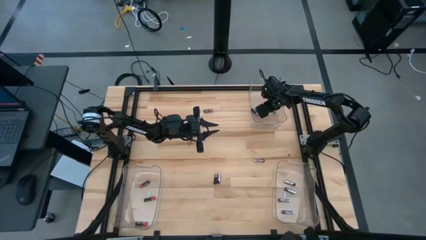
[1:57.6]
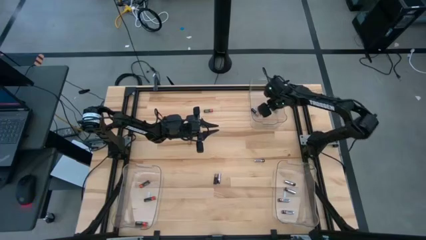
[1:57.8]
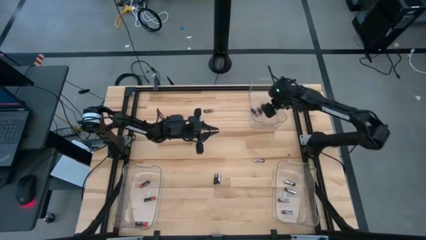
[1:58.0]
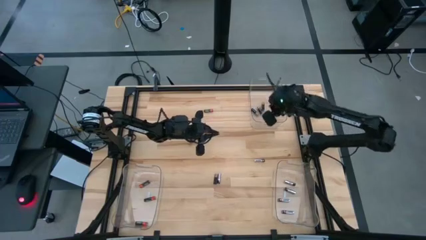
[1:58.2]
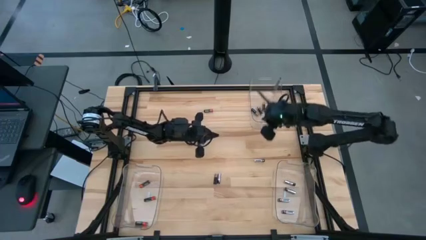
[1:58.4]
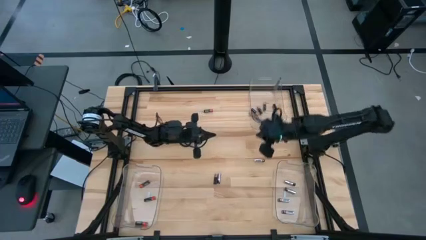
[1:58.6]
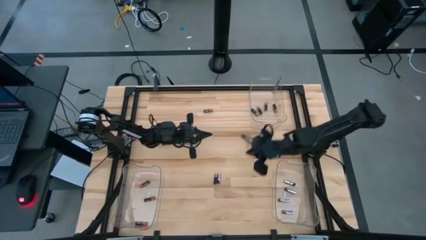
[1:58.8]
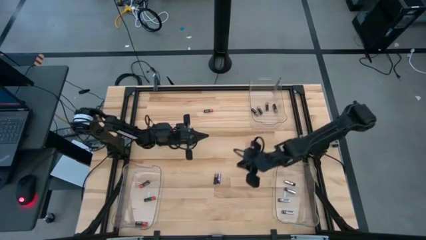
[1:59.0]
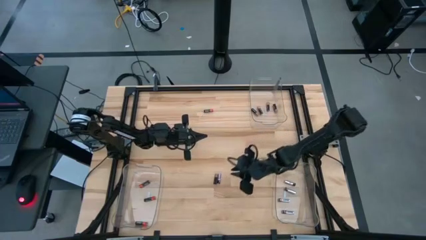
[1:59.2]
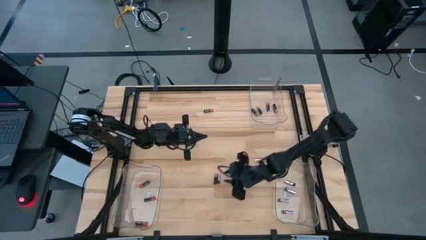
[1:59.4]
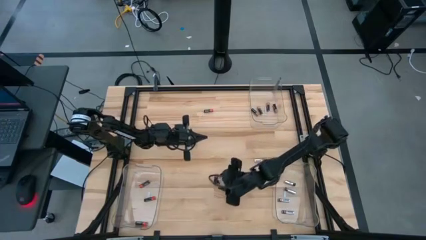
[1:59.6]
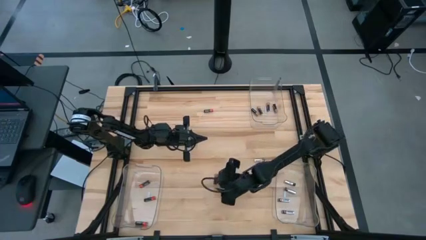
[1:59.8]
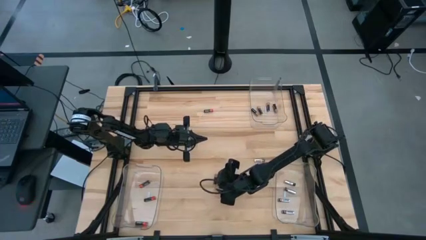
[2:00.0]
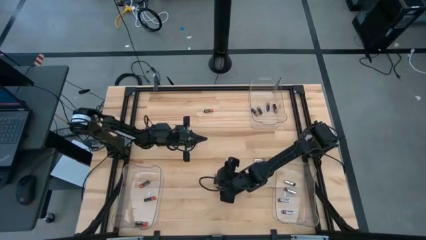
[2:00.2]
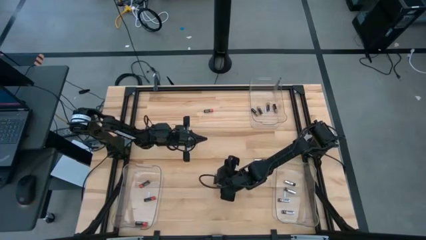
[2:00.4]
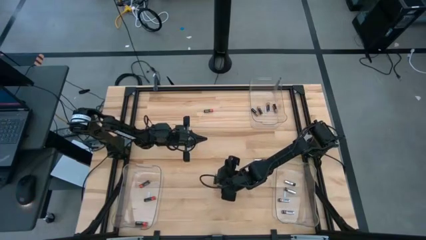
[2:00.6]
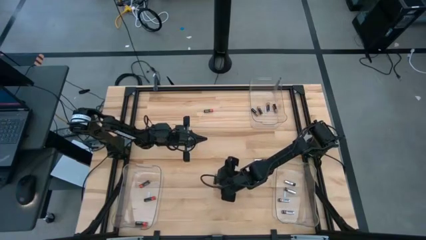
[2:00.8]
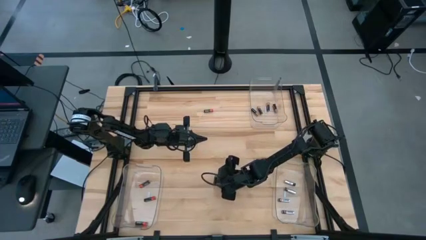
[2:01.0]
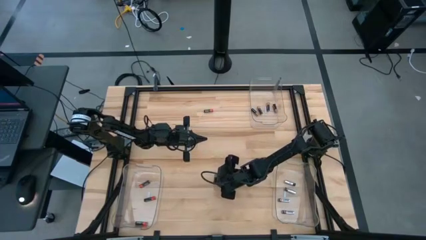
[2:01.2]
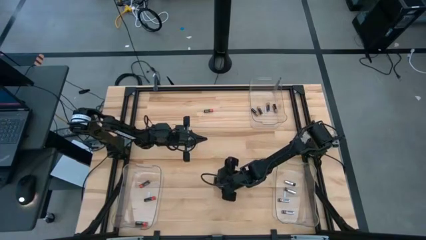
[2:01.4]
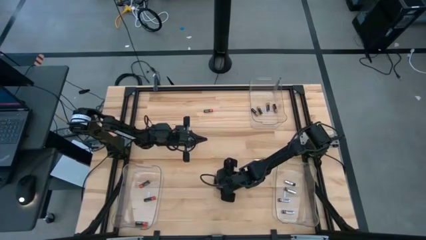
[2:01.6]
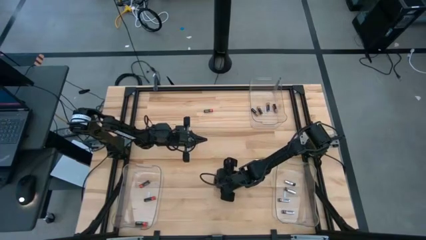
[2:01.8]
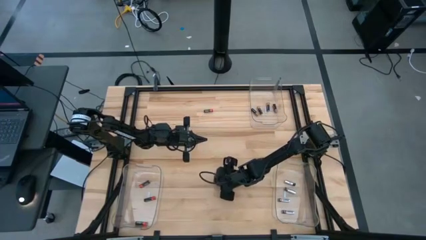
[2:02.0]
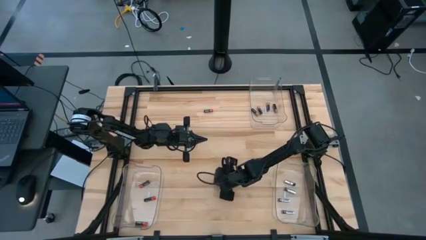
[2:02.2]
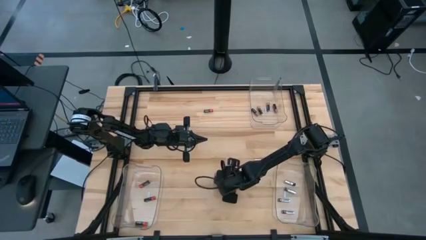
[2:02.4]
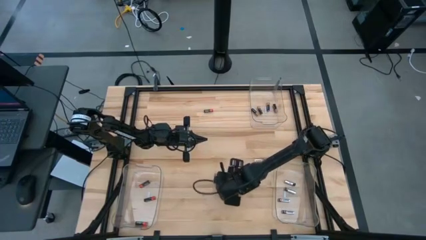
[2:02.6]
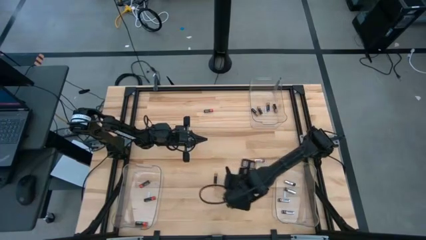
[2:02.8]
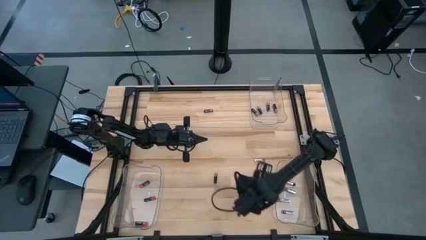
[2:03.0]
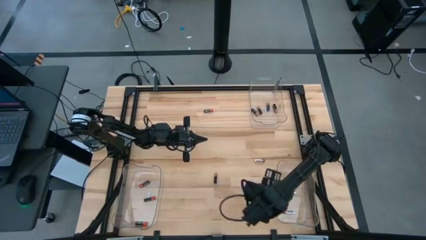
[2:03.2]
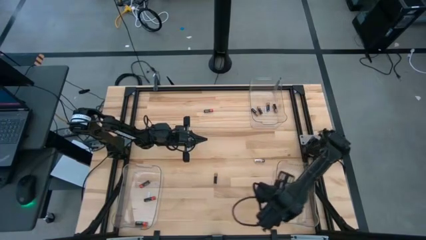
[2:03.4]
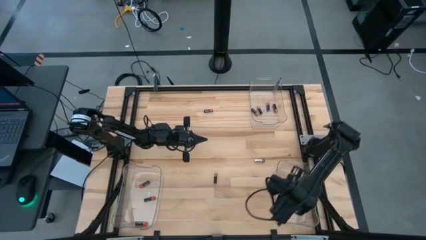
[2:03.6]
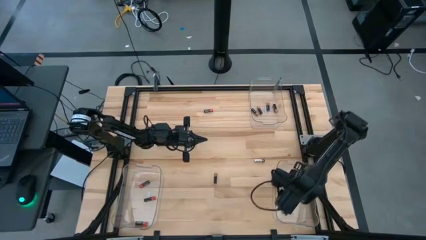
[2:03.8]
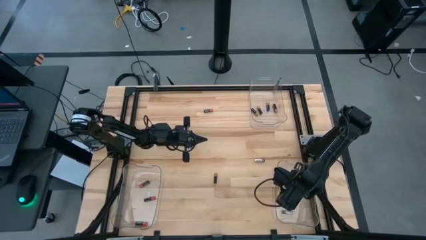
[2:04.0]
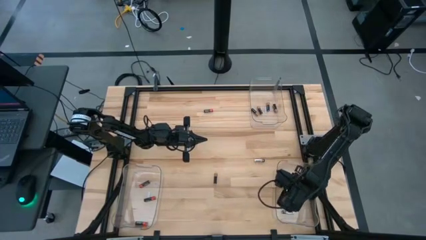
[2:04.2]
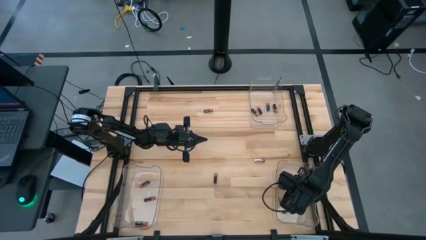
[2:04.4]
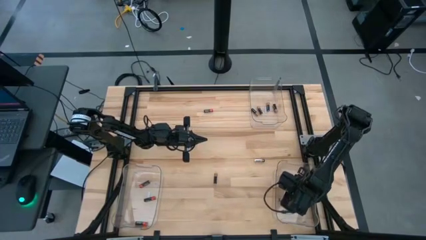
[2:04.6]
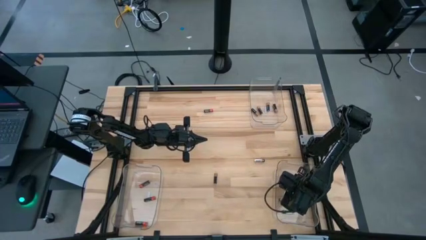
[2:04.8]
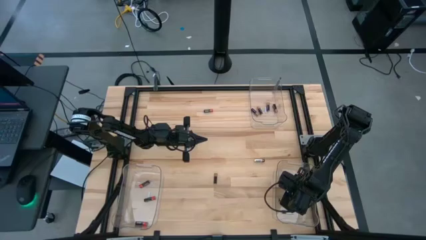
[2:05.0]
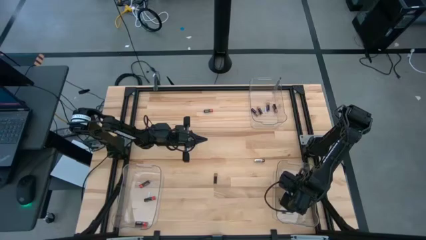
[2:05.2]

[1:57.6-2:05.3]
Task: Sort batteries
Put the white battery into the bottom right transparent bin

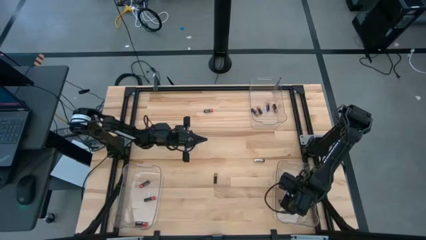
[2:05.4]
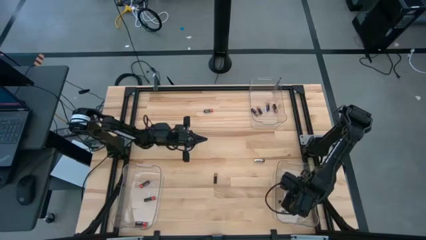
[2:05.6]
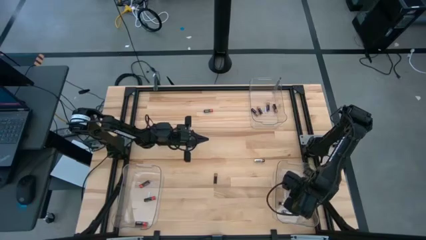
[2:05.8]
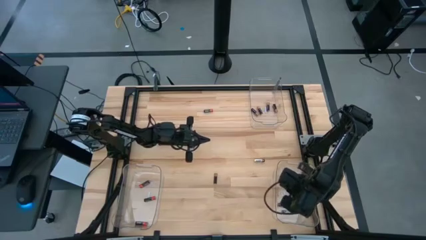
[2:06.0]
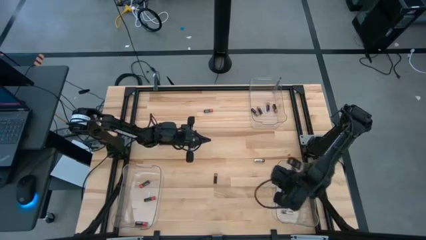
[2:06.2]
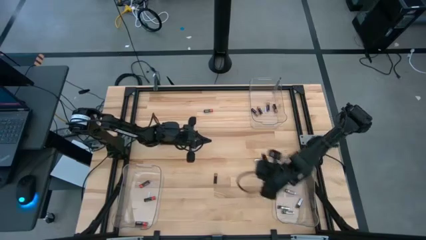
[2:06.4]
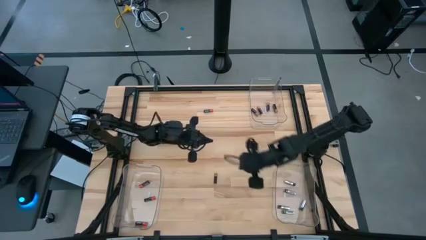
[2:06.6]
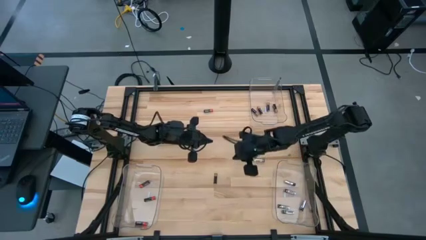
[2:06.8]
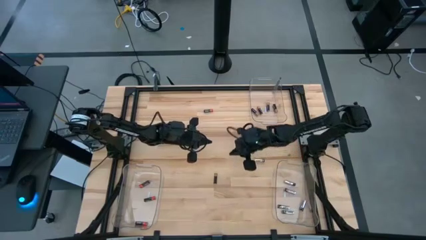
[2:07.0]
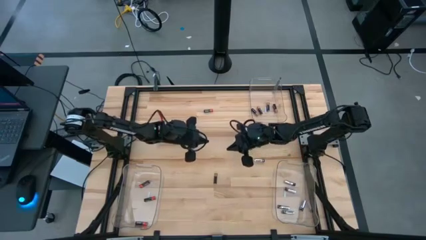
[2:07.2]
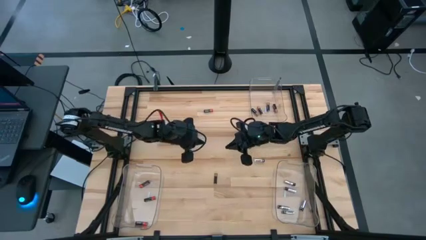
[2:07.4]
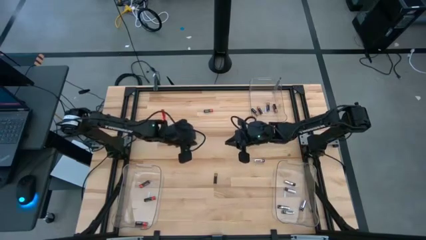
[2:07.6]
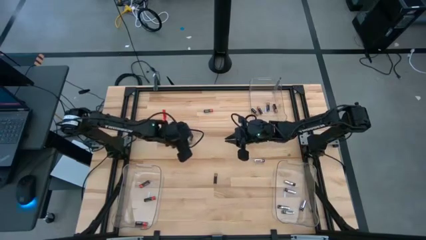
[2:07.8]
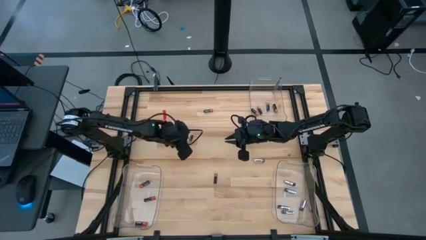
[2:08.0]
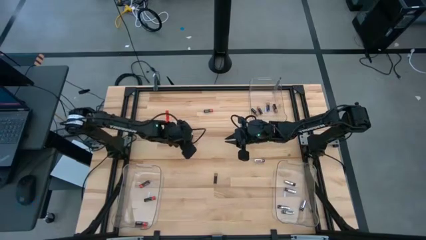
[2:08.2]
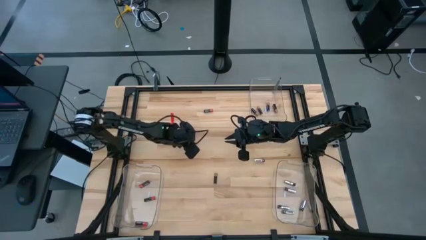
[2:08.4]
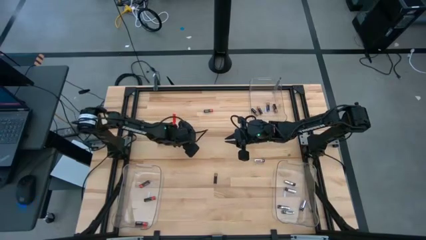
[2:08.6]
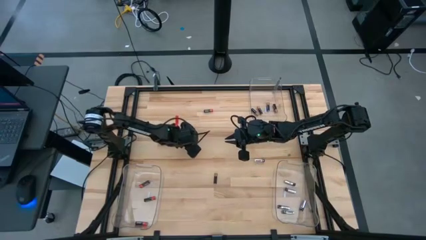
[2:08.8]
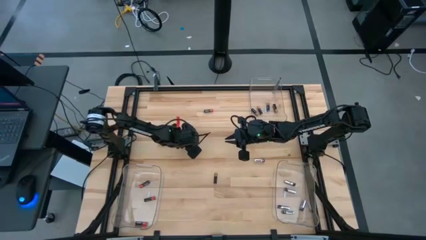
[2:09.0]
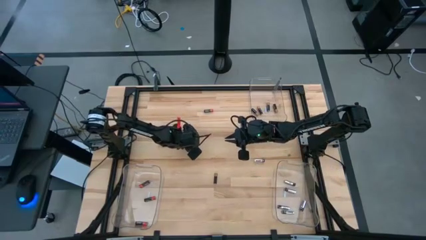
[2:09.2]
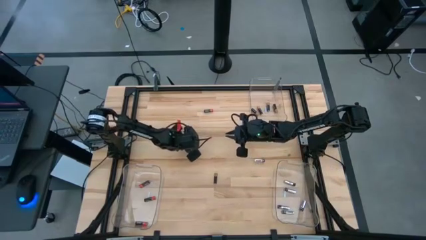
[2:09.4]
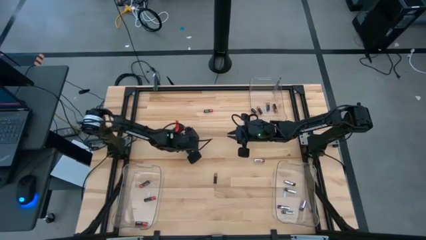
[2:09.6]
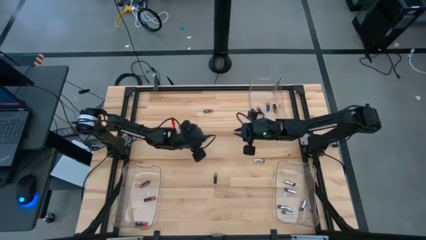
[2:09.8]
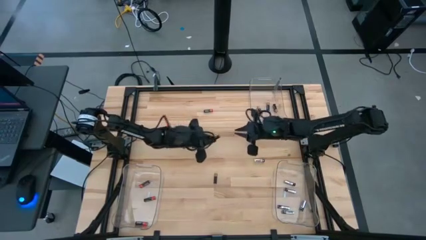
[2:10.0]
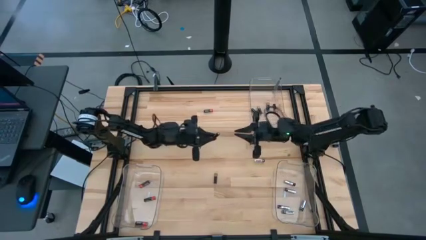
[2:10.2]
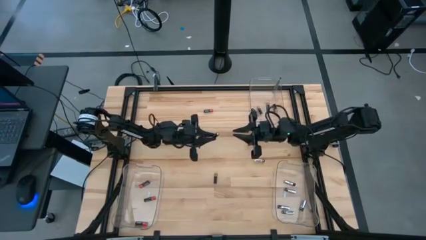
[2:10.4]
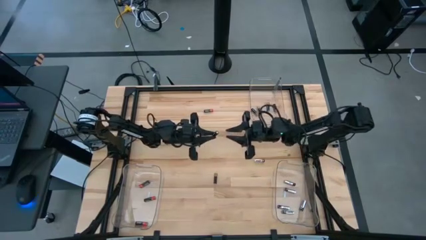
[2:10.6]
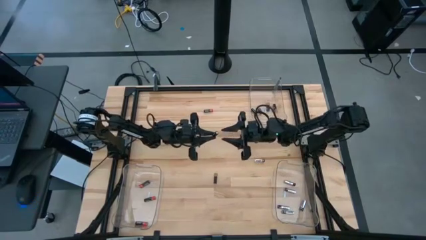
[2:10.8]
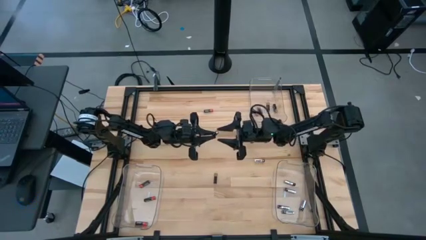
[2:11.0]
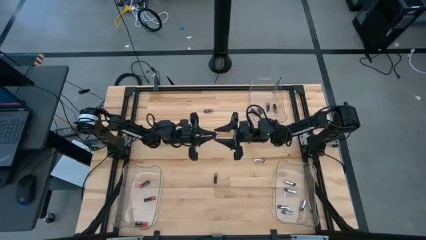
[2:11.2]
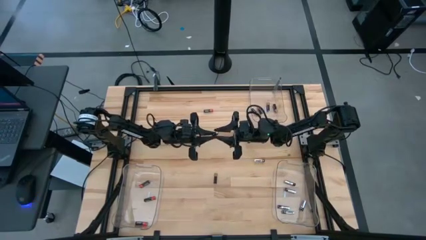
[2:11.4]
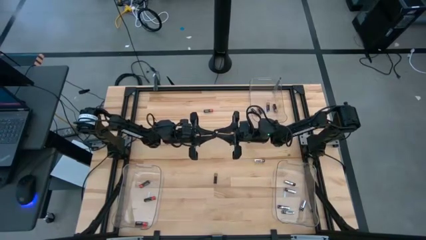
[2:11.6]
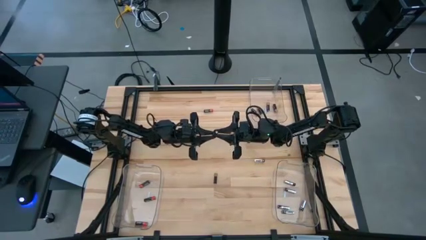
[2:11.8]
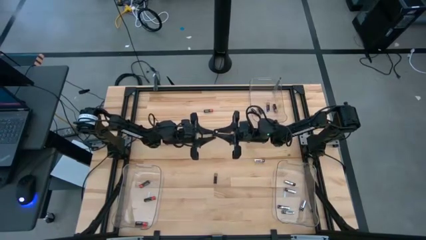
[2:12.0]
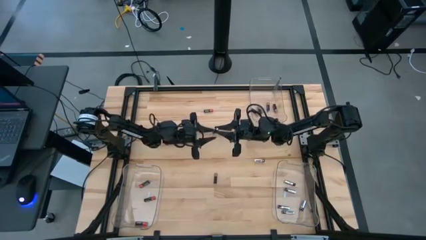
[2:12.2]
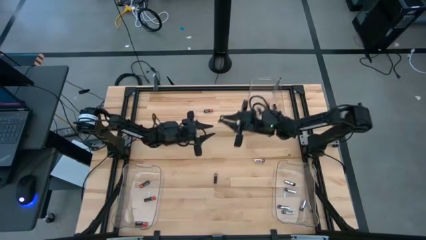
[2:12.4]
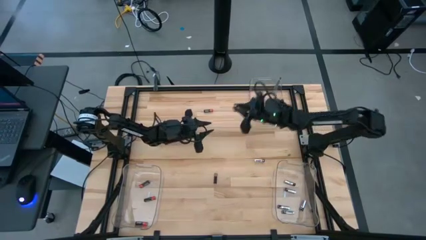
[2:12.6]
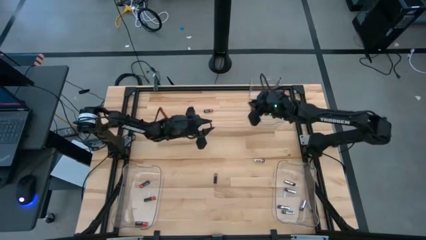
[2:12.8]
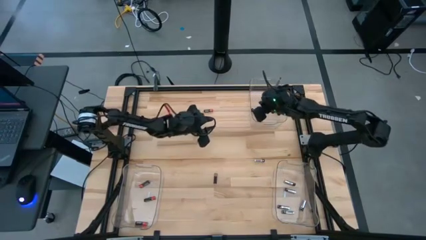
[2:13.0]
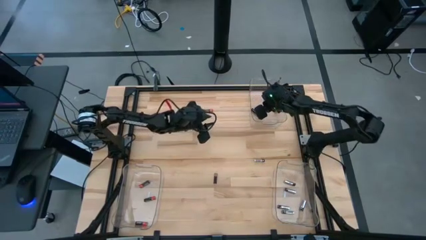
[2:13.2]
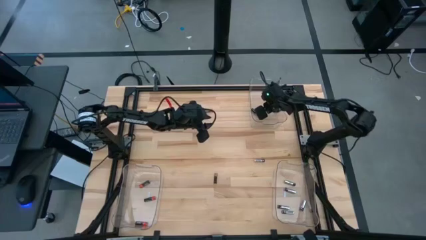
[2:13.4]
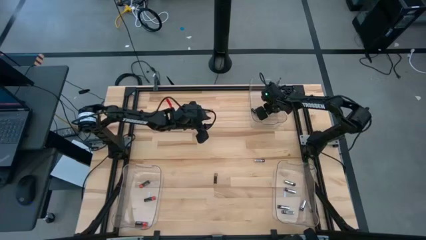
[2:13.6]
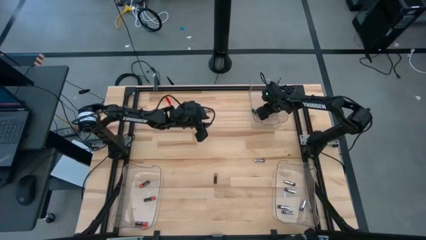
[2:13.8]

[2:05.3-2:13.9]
Put the brown battery into the top transparent bin
